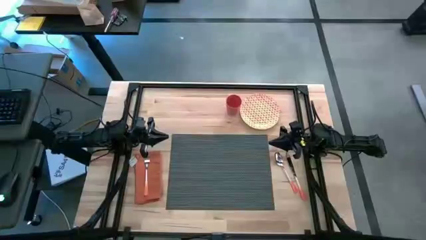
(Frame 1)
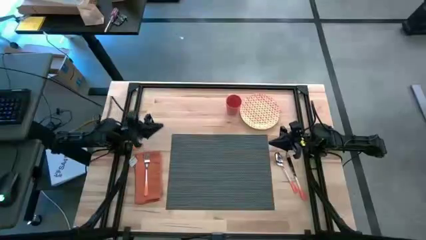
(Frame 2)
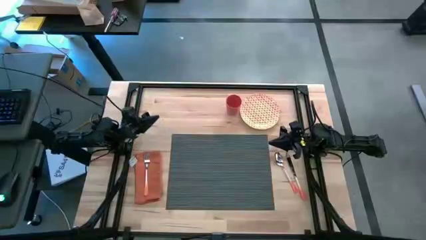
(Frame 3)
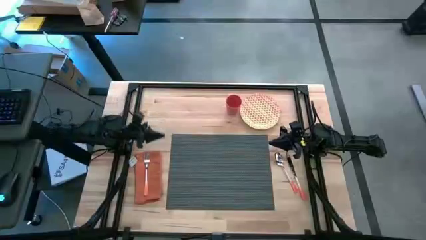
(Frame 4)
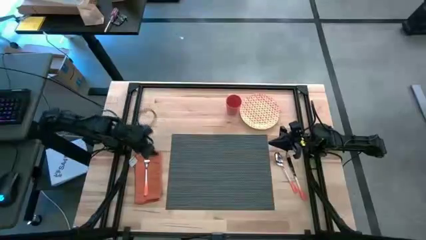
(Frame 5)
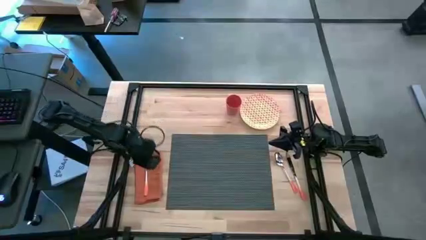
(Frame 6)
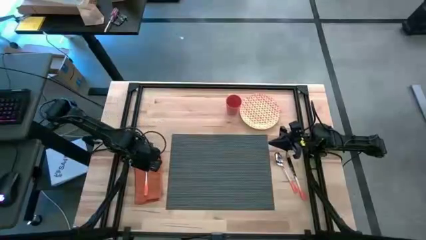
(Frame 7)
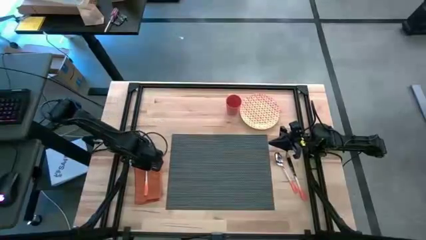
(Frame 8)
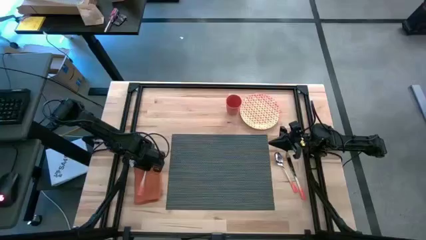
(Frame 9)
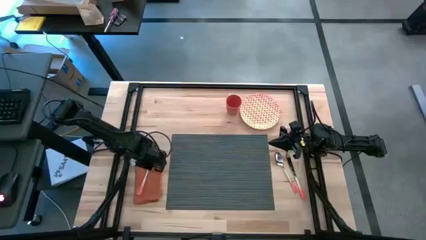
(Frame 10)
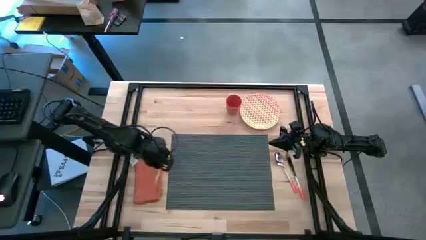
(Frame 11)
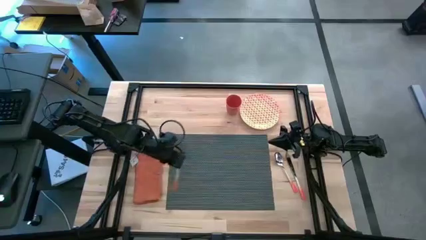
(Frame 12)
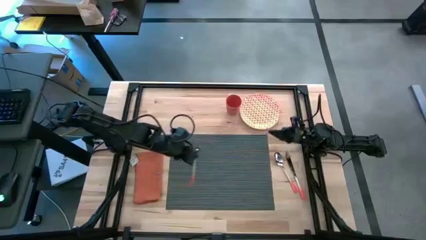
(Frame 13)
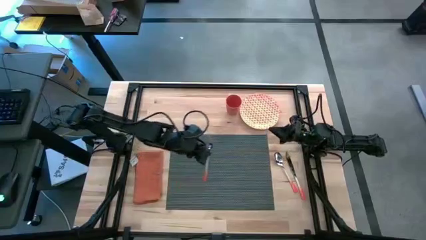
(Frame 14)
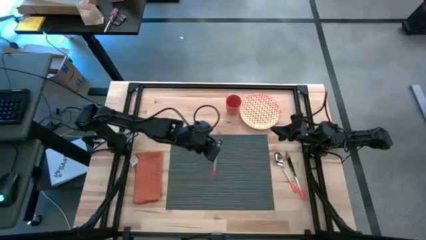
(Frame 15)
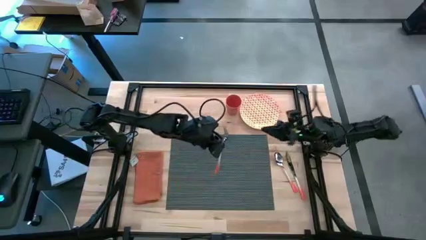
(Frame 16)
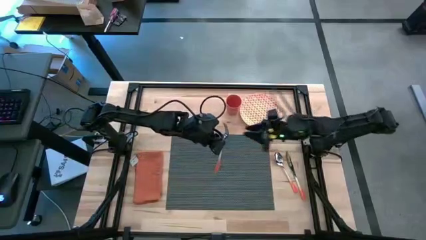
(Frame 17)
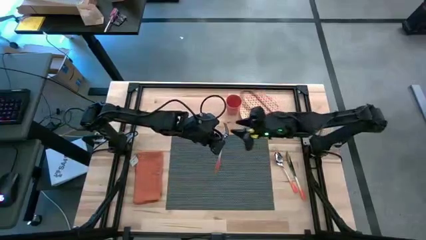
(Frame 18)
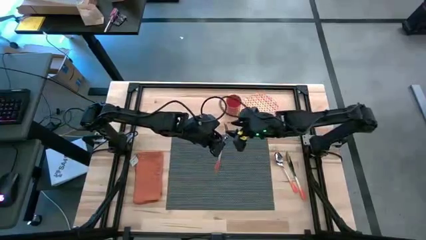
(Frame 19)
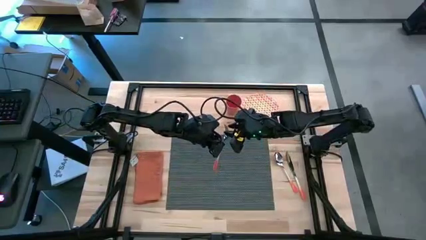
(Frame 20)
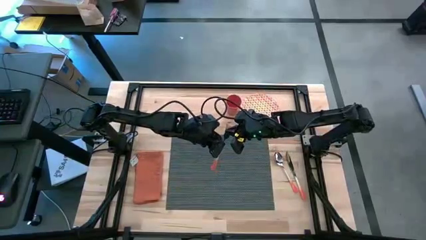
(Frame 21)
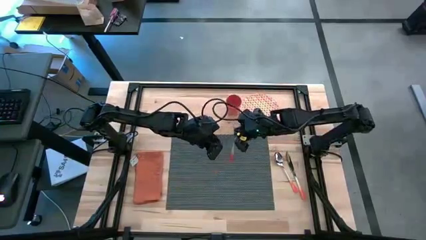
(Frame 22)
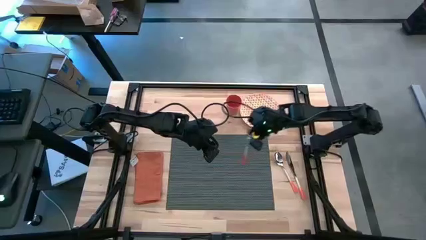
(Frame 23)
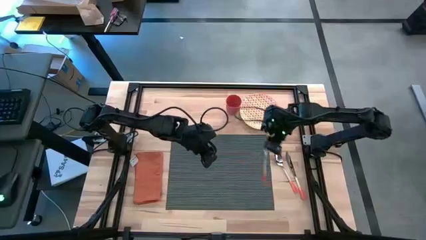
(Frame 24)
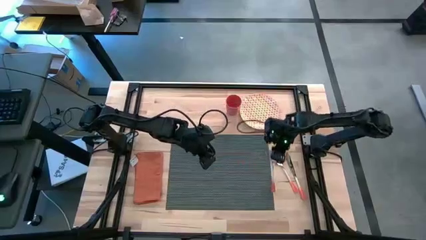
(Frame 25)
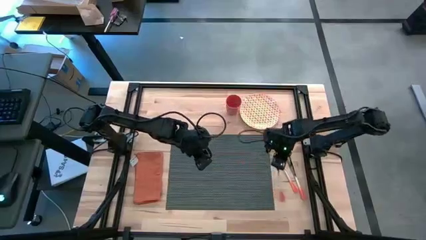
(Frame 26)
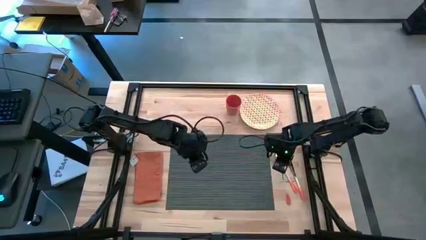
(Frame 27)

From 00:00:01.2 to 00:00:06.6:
Task: Set table place
Put the orange fork to the beside the orange spoon on the table
